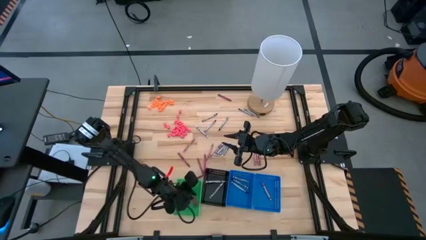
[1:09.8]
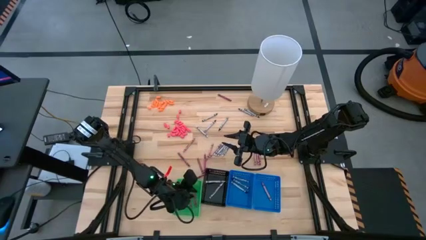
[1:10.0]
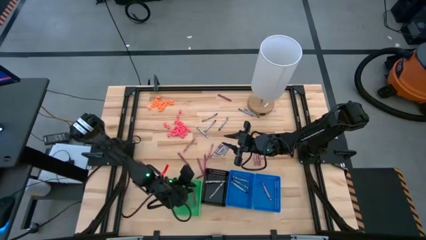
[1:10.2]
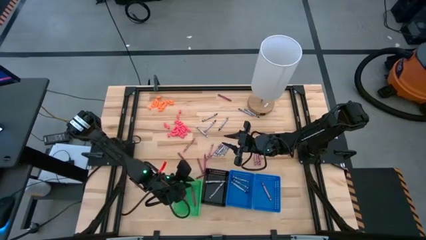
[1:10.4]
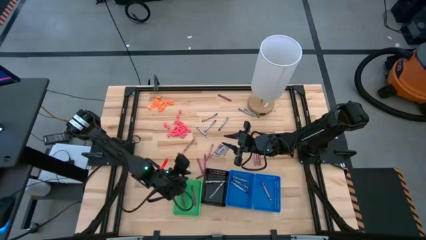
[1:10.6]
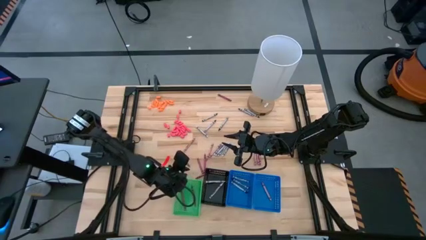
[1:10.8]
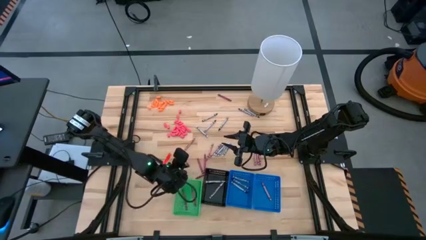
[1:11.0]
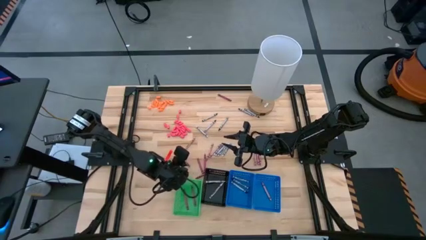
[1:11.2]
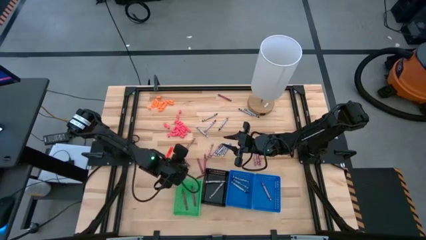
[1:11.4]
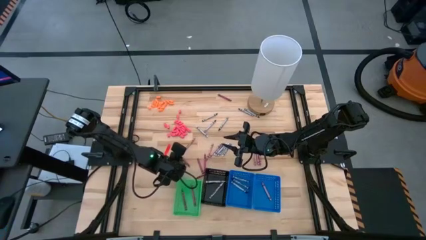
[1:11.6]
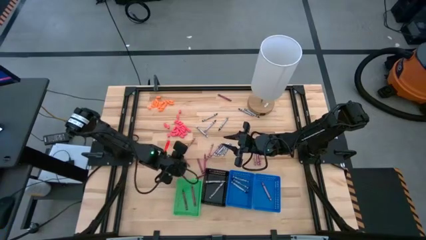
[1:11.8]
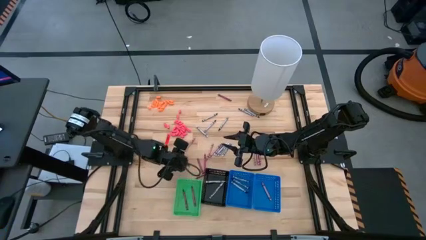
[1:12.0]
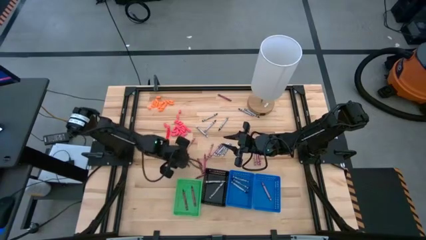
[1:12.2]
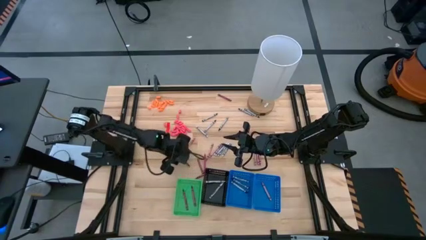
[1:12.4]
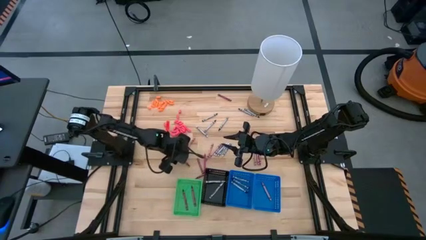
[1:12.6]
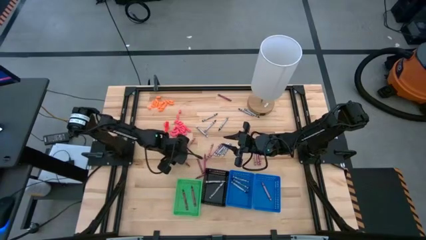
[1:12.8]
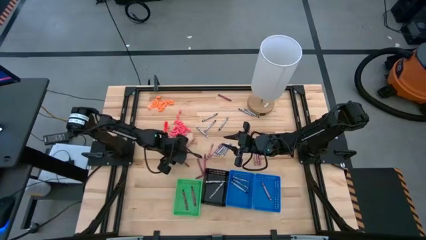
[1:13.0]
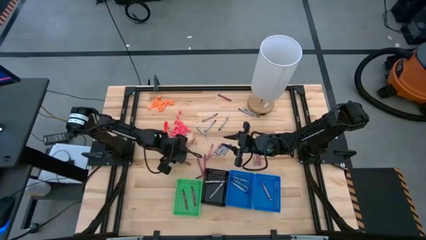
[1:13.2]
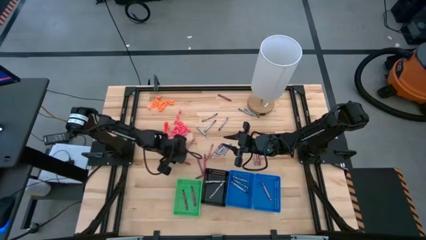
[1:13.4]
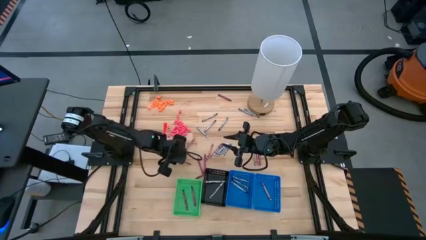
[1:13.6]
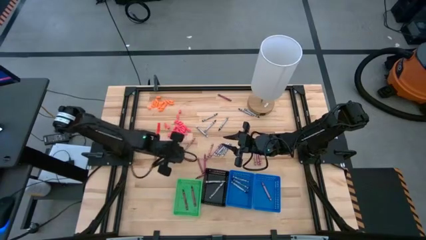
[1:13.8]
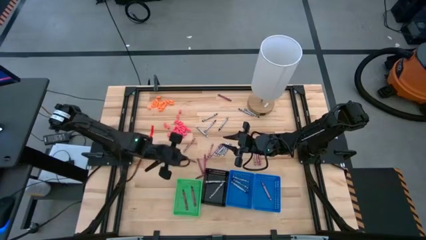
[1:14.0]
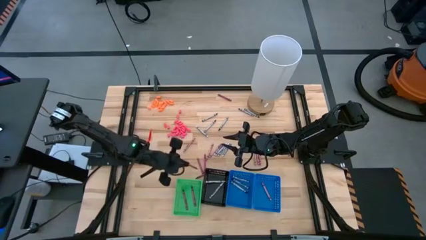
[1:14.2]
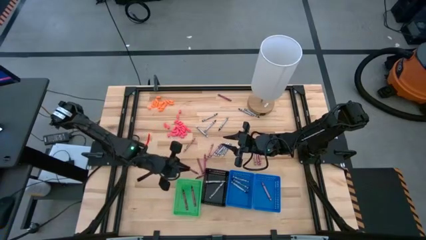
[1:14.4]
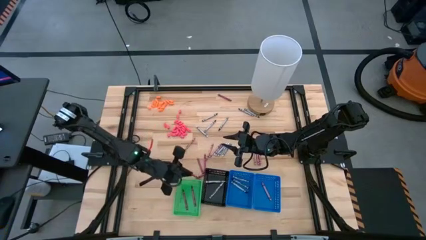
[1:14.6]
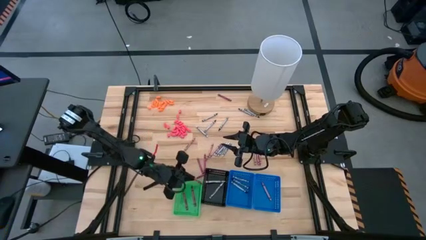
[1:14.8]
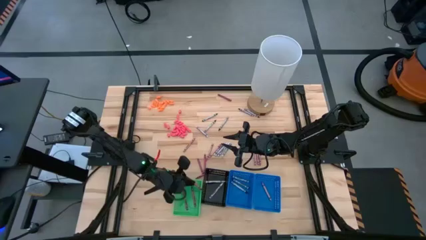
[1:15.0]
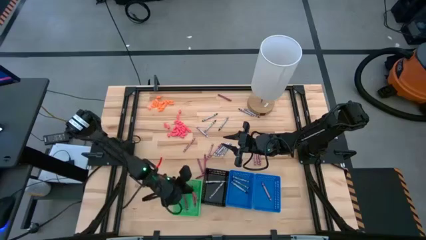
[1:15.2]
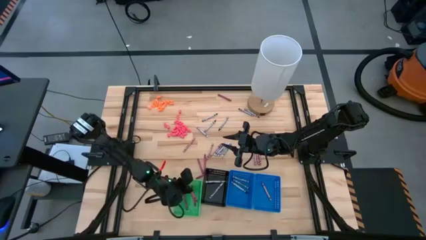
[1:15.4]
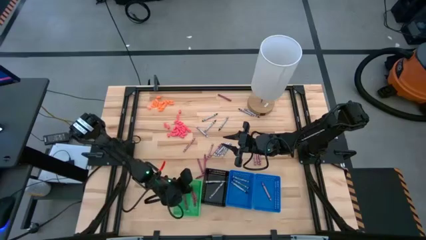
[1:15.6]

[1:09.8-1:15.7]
Task: Sort crayons
Put the red crayon into the green bin

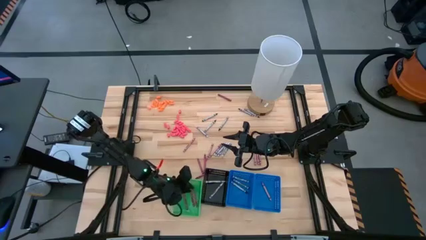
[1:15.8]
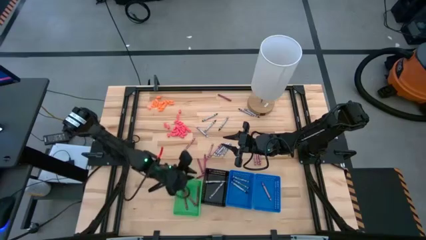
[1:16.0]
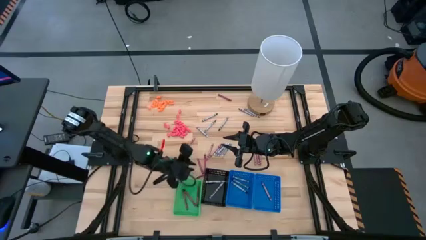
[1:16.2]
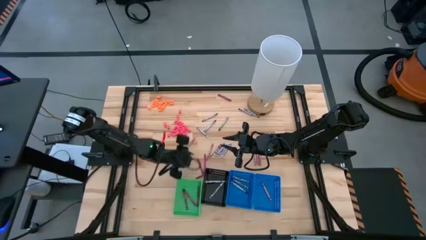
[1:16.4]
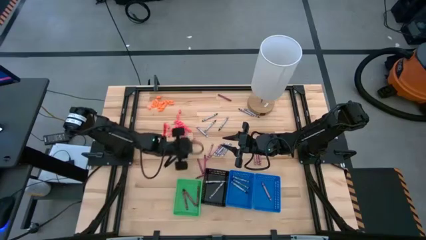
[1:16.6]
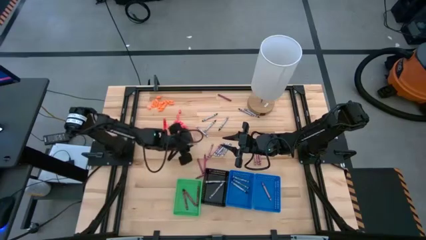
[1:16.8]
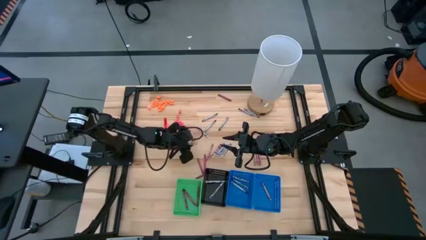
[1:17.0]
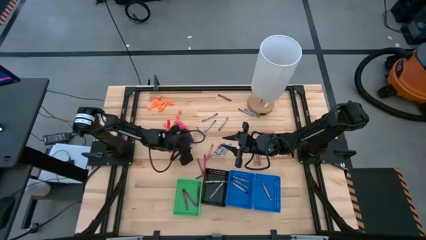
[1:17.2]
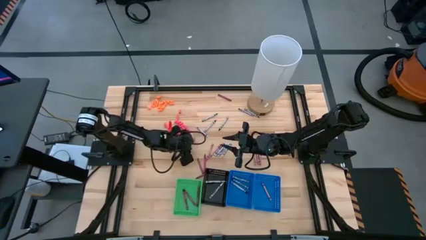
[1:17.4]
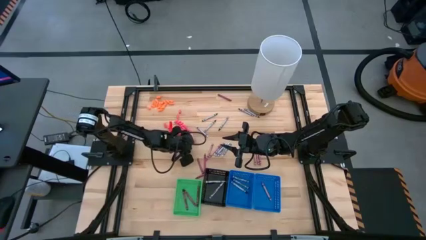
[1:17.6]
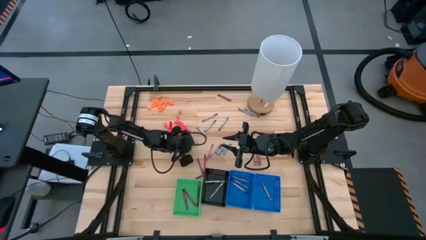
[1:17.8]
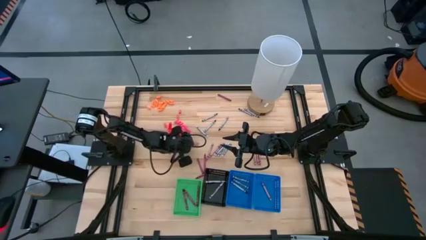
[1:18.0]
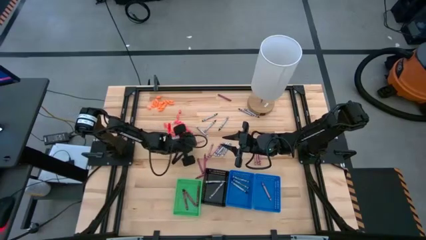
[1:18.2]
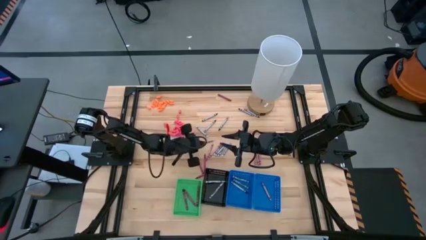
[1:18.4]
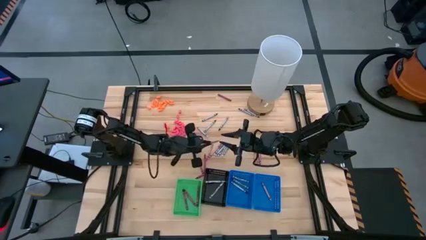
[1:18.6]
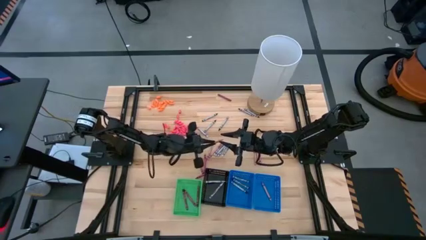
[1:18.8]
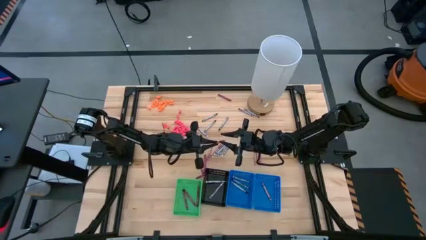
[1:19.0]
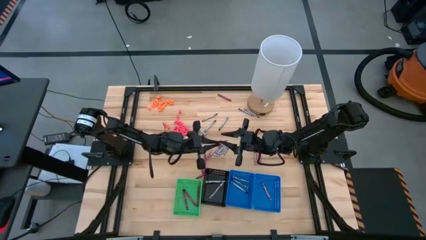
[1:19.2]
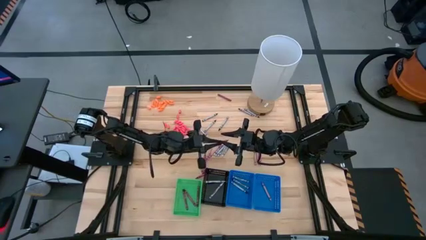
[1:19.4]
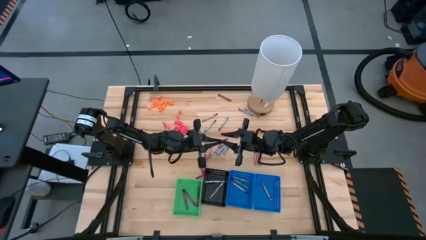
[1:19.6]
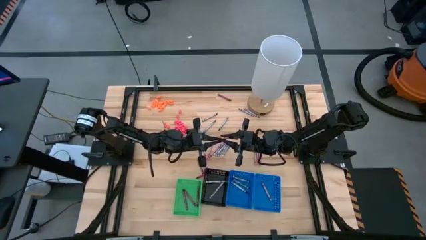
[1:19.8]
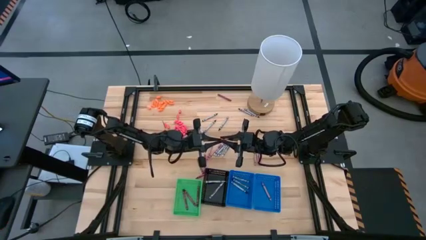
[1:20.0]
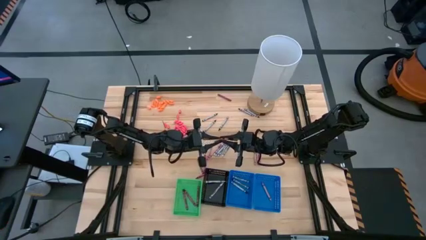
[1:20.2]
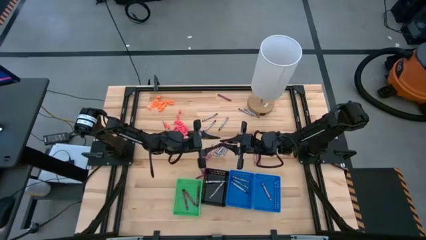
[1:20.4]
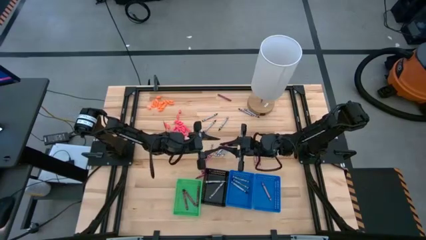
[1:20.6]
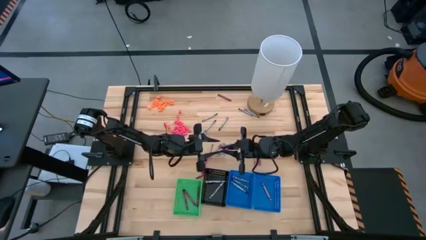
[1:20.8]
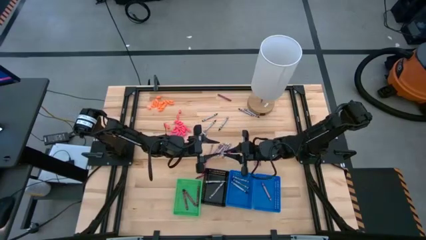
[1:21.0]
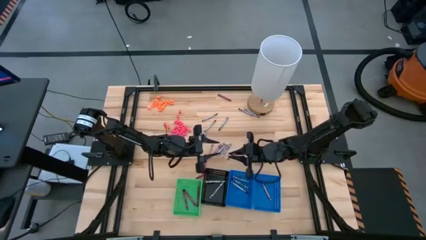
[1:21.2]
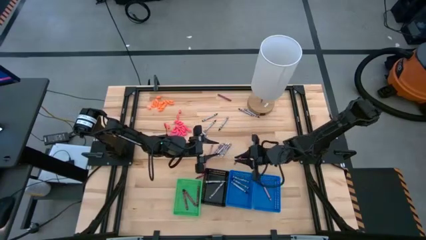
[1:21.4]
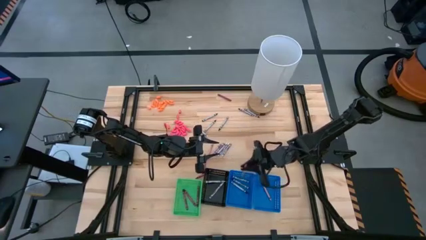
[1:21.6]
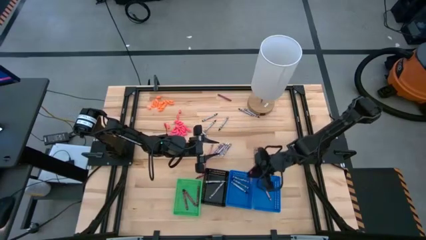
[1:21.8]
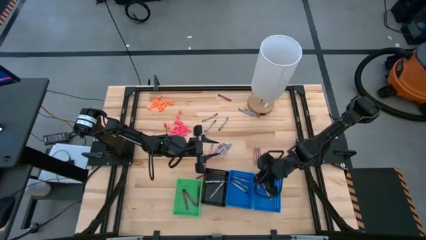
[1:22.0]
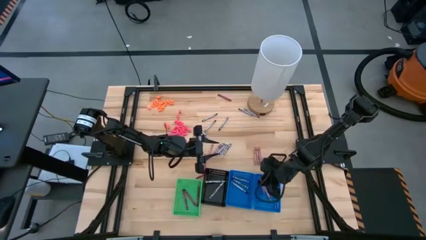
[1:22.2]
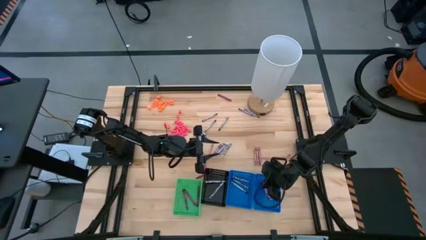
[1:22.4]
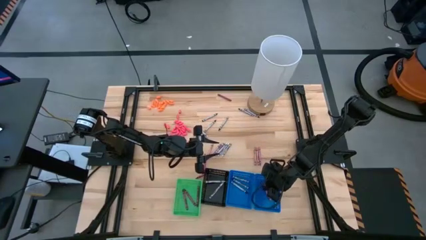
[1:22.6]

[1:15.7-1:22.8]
Put the pink crayon into the right blue bin

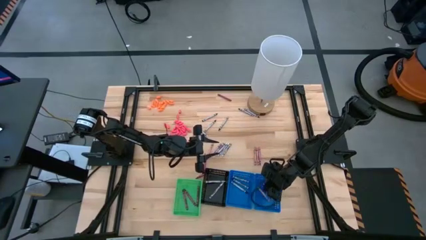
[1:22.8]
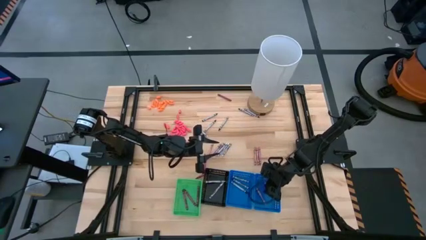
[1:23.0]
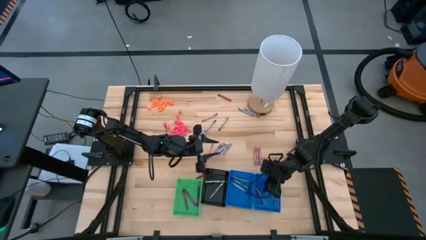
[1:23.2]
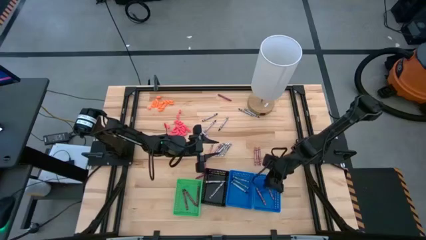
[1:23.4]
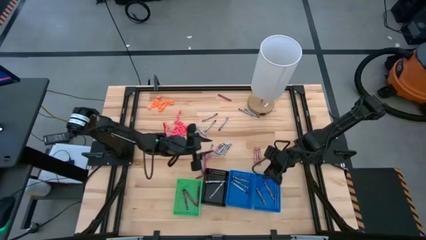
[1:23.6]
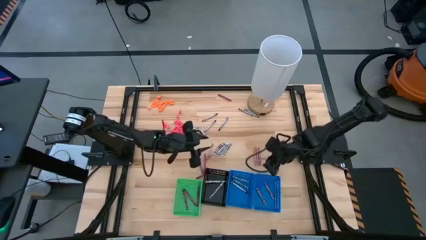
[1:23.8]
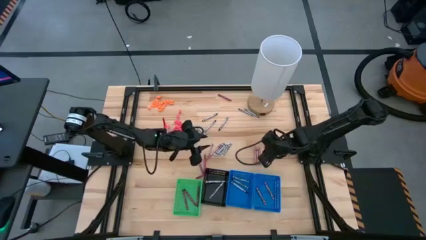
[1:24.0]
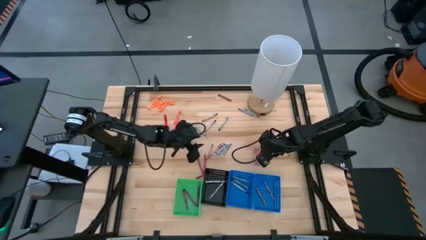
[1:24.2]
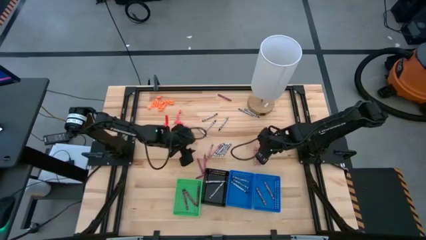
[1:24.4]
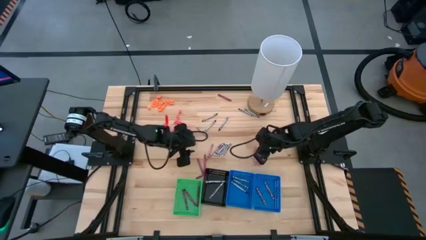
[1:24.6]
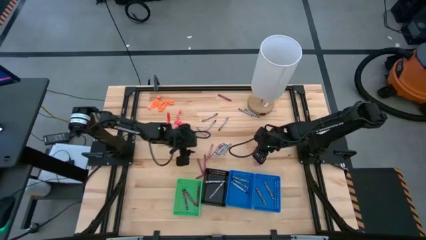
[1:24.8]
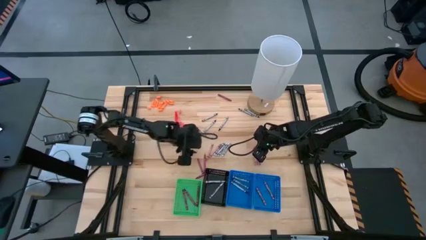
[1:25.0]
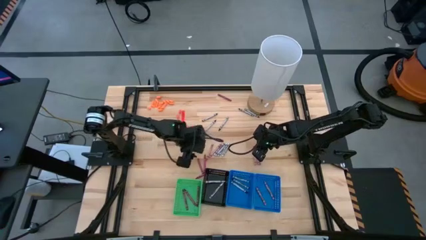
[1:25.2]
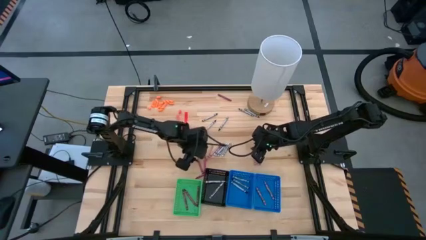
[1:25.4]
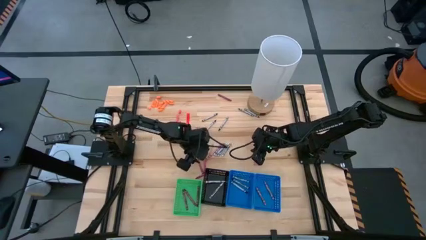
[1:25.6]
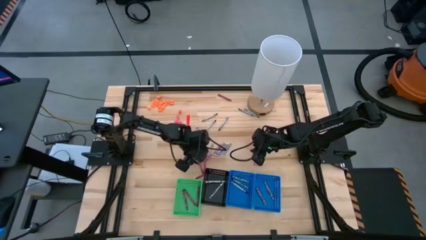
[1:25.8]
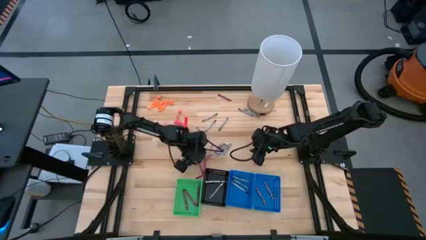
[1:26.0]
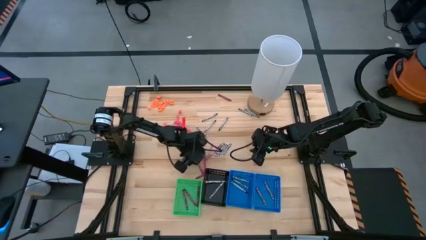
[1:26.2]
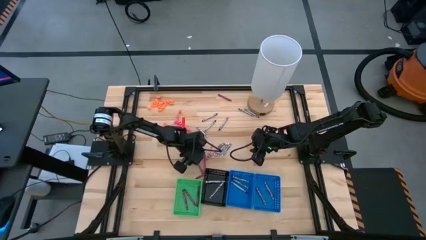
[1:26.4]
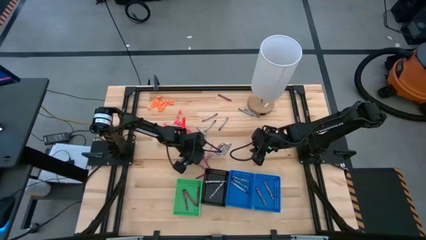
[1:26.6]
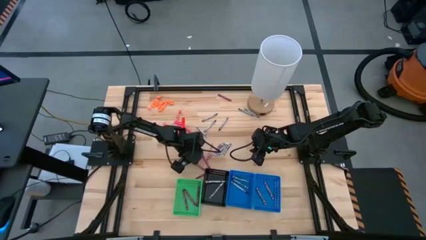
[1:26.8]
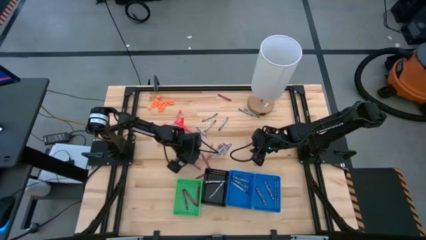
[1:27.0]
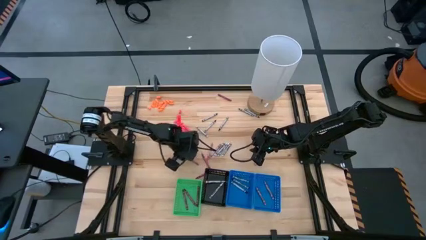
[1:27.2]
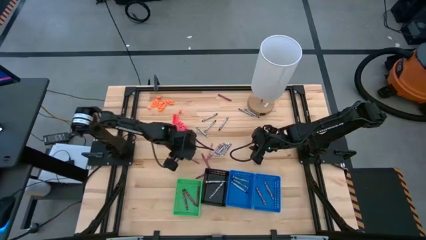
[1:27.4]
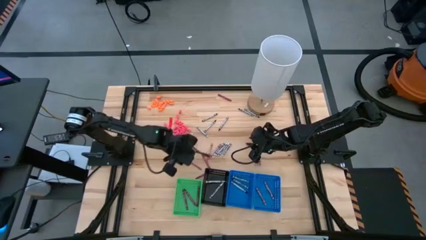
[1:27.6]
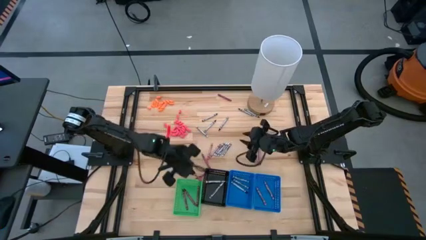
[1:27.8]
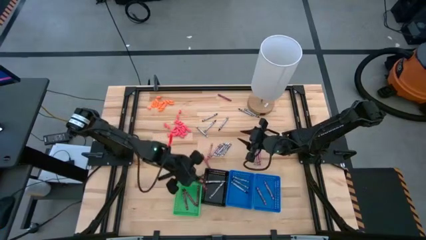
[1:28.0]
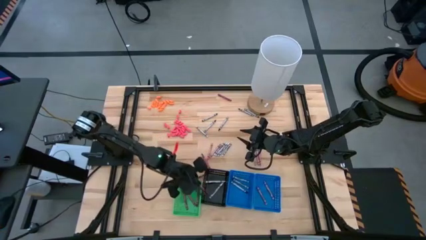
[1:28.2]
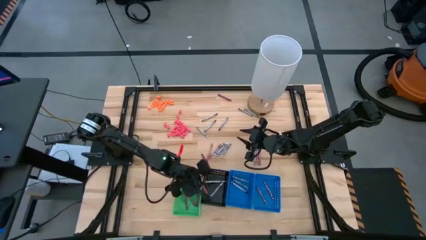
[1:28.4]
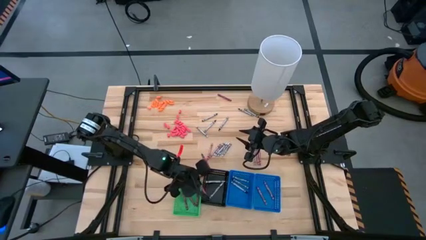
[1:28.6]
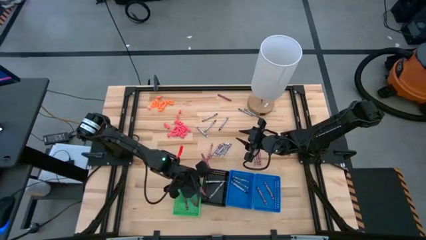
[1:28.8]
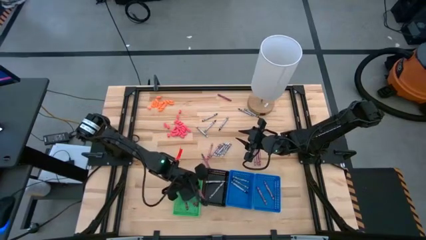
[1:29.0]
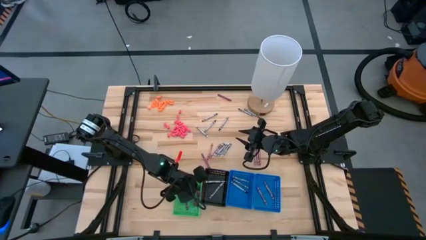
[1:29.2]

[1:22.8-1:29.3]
Put the red crayon into the green bin
